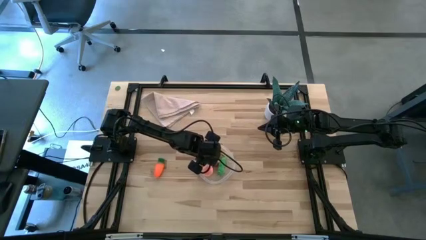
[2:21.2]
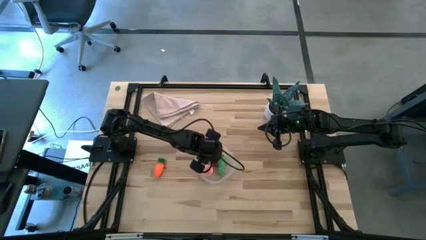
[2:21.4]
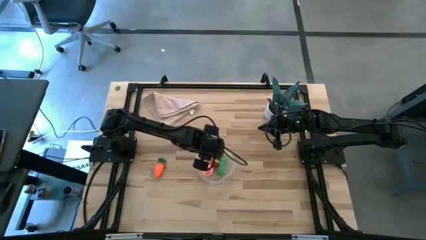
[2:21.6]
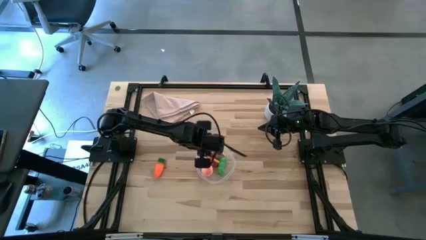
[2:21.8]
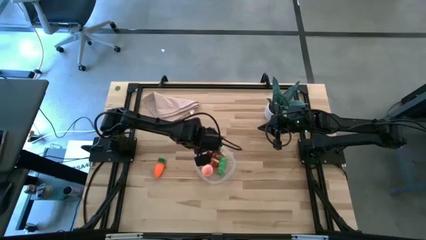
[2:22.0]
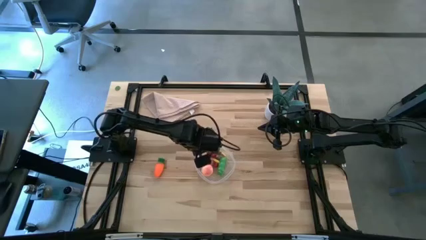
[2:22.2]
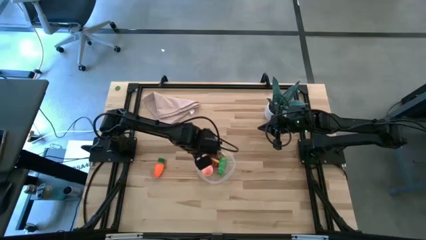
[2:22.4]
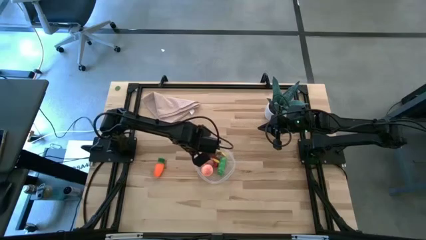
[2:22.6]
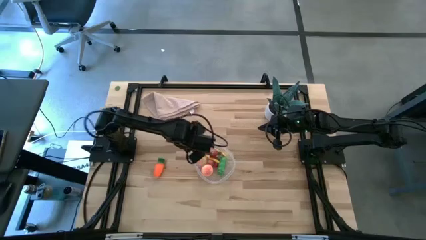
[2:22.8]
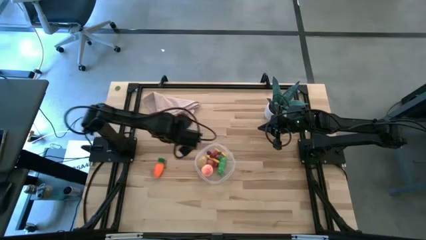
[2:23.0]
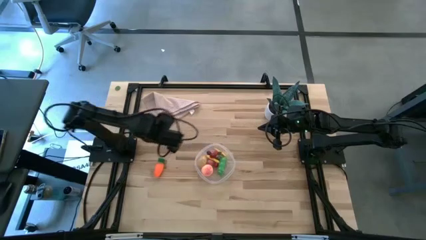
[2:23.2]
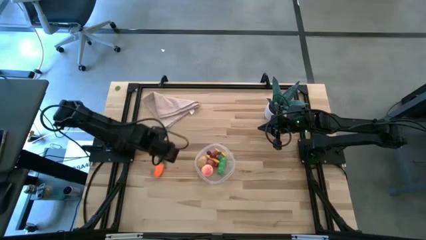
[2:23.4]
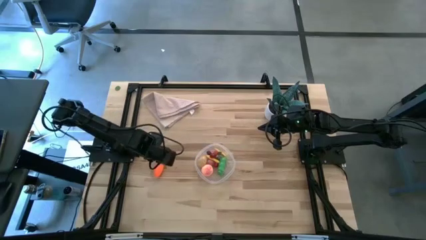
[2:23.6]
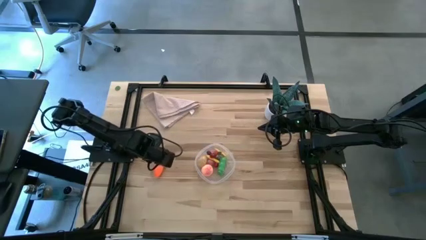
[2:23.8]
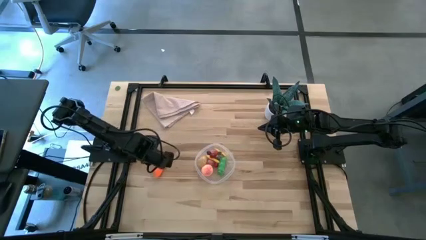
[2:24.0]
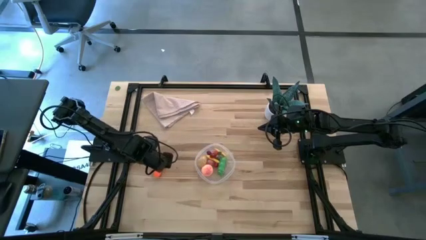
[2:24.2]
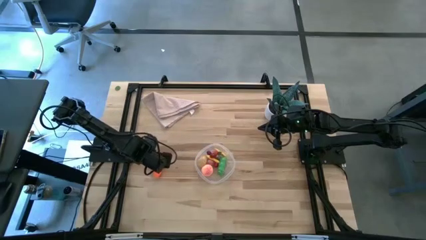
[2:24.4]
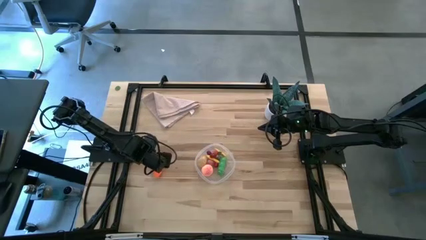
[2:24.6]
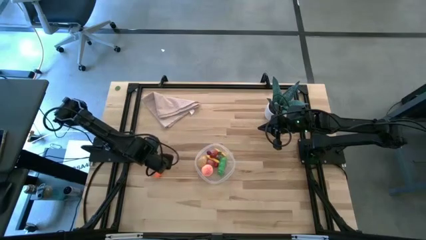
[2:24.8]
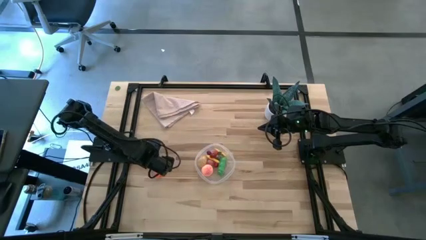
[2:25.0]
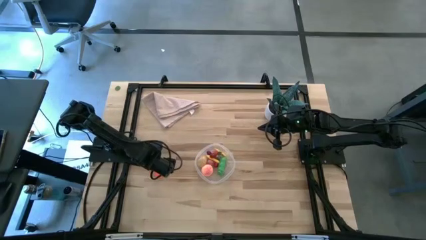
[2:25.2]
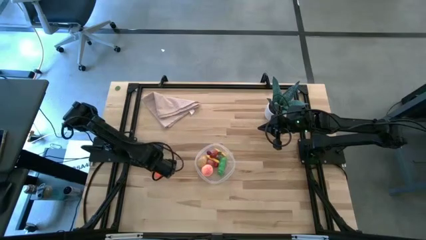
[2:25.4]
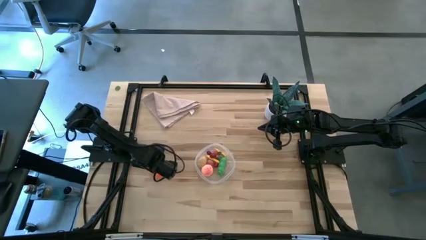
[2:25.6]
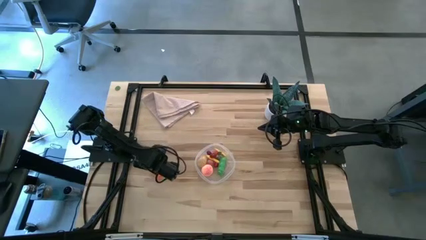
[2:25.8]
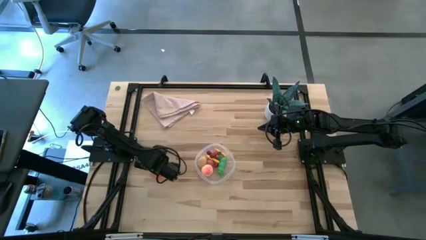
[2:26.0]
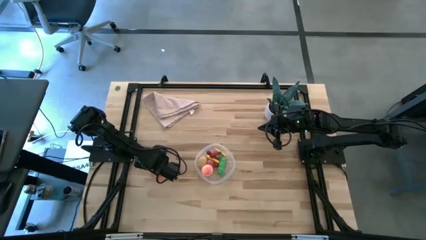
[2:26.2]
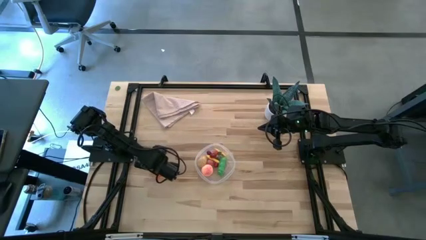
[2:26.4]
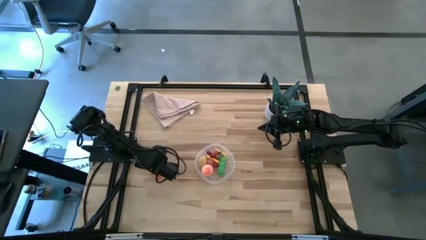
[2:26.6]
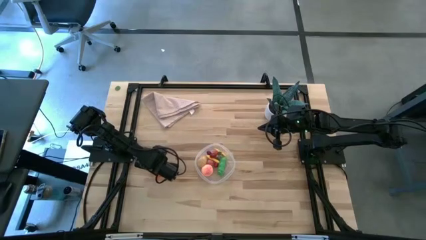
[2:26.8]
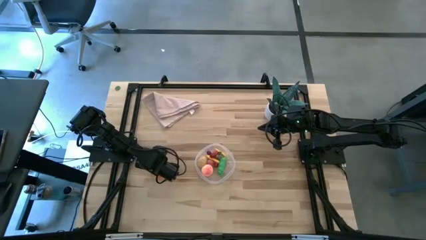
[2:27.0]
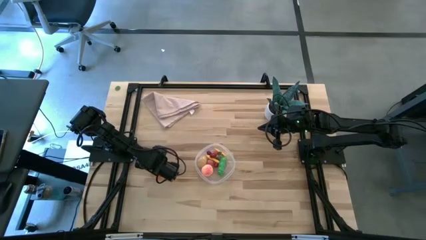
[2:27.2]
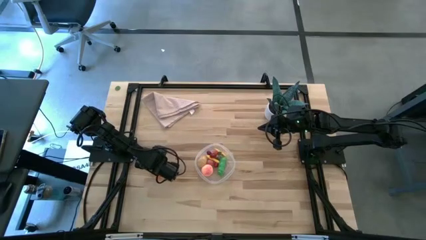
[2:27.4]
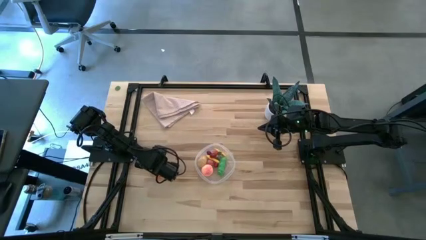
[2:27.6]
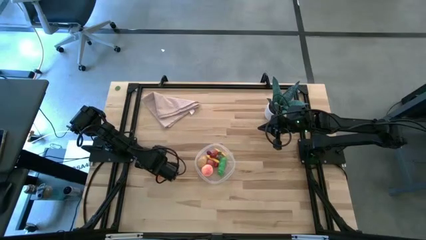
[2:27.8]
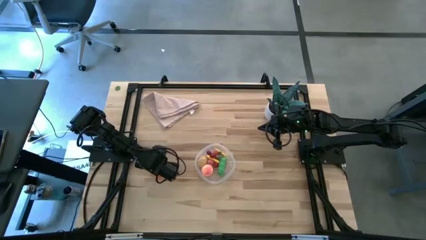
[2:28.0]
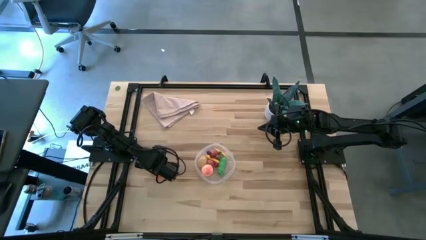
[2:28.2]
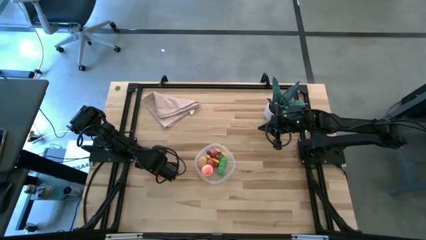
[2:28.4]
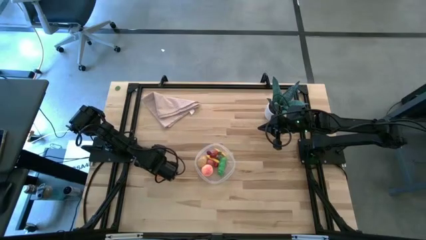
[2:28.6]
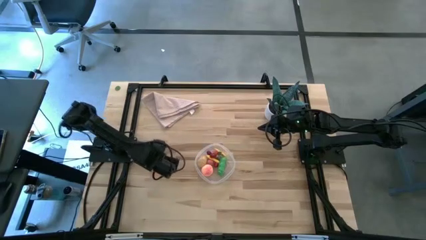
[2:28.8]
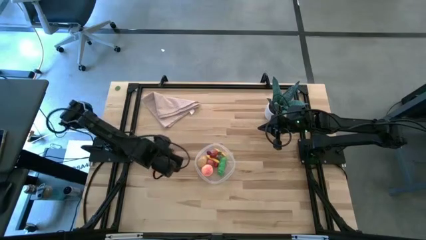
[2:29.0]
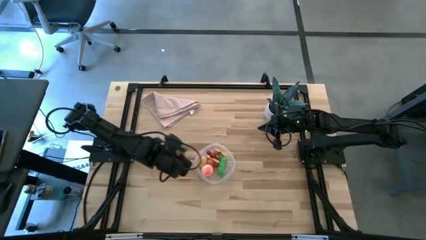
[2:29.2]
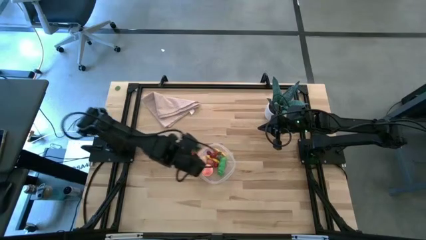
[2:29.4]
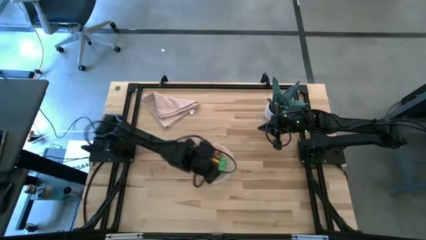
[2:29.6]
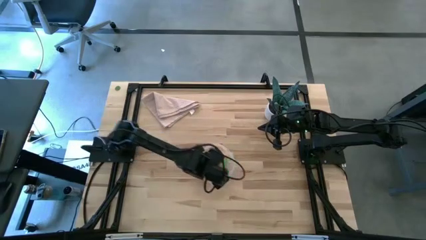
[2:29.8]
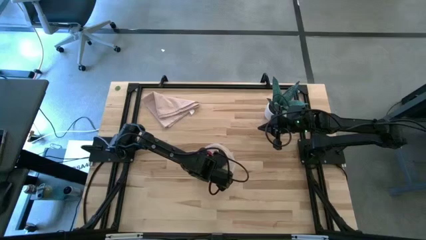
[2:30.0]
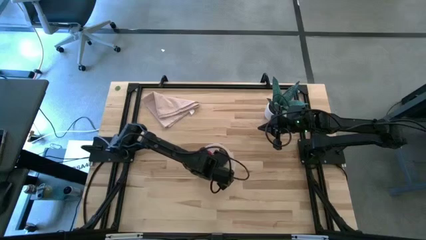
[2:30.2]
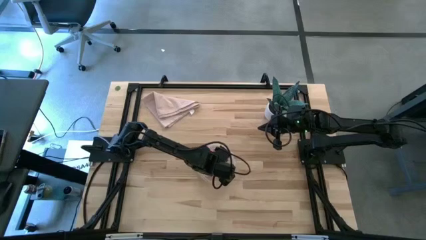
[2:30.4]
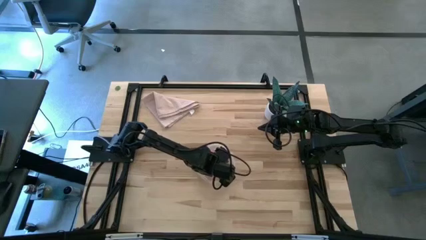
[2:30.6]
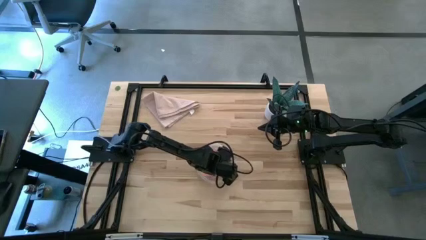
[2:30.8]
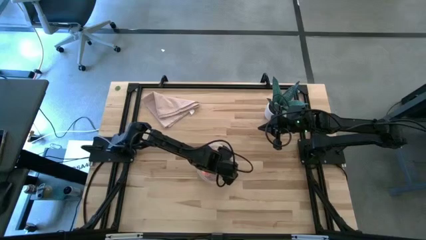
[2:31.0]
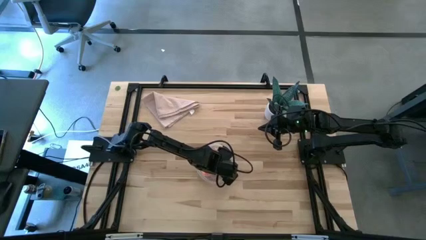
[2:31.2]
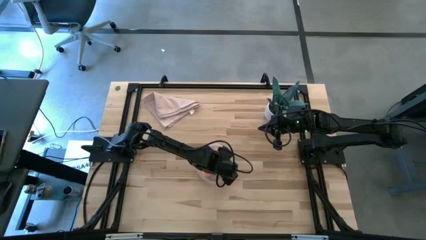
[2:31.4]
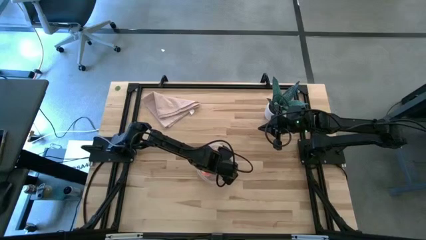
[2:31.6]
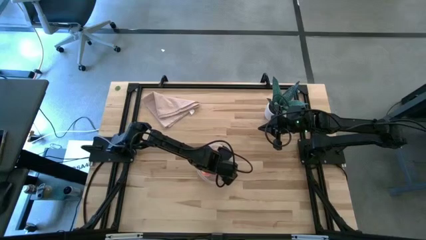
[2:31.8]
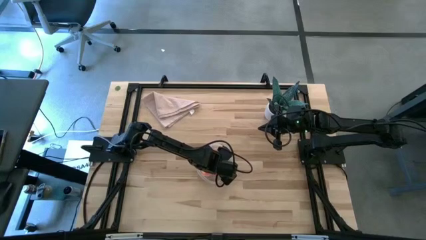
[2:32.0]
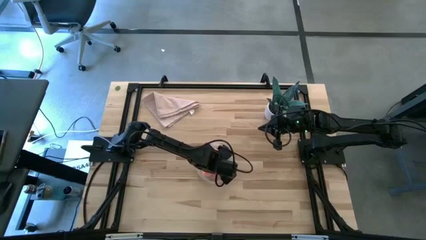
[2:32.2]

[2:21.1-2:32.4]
Task: Pick and placing Produce into tupperware
Put the carrot into the transparent bin

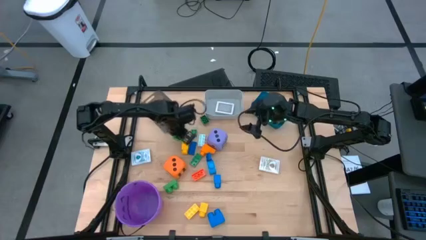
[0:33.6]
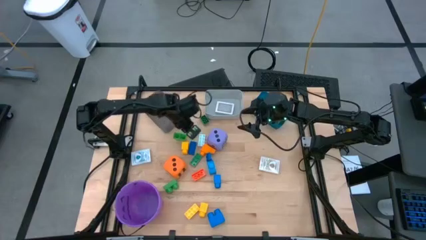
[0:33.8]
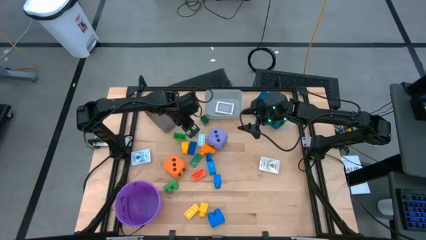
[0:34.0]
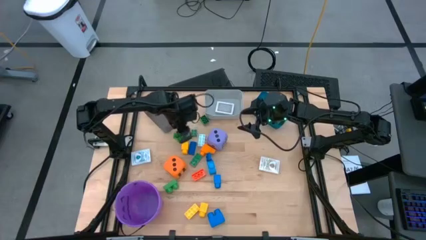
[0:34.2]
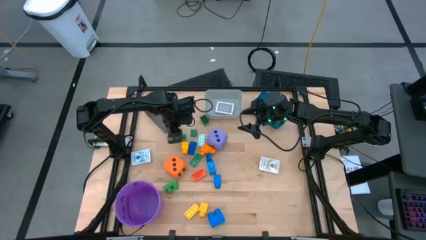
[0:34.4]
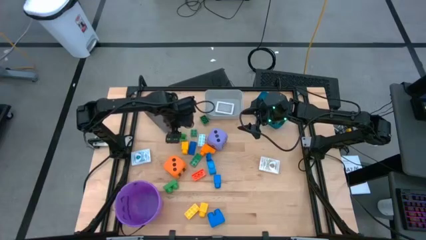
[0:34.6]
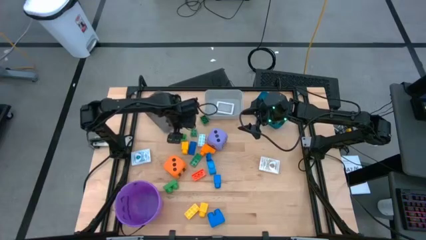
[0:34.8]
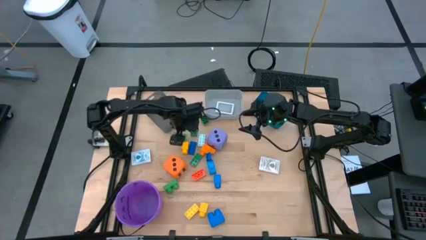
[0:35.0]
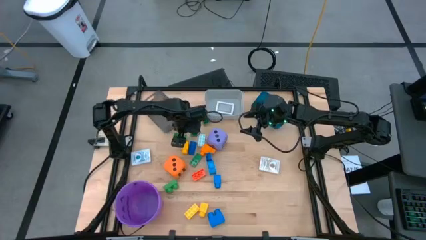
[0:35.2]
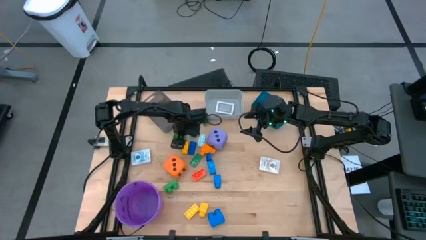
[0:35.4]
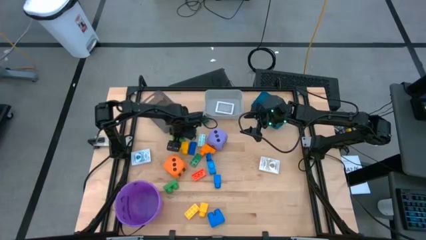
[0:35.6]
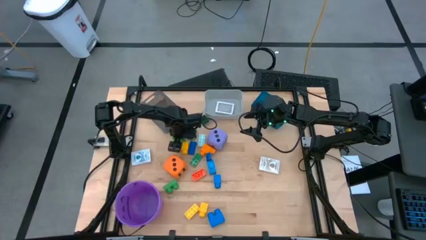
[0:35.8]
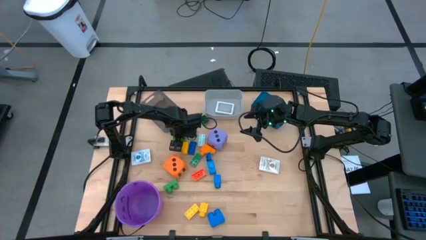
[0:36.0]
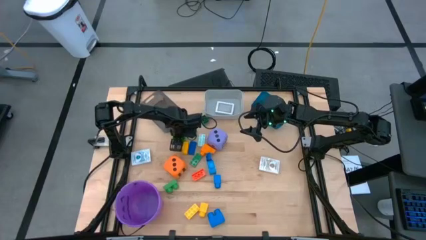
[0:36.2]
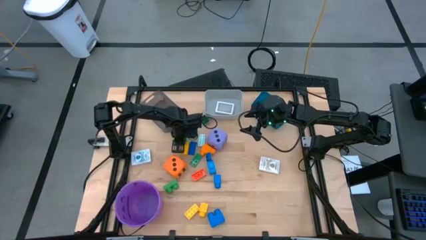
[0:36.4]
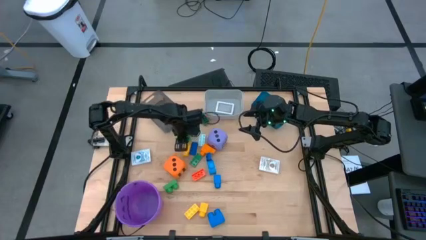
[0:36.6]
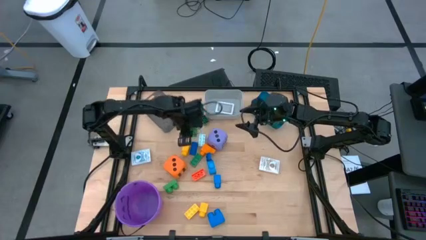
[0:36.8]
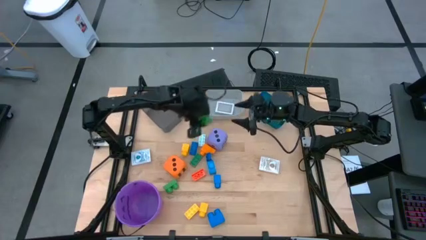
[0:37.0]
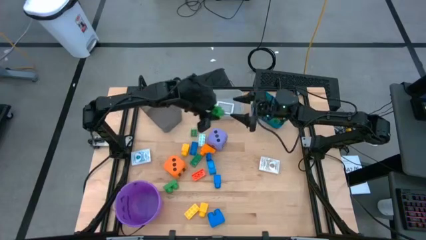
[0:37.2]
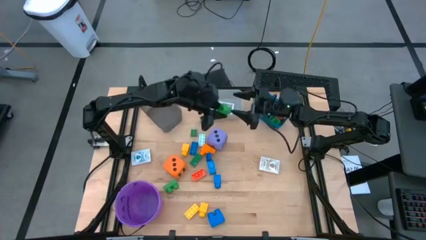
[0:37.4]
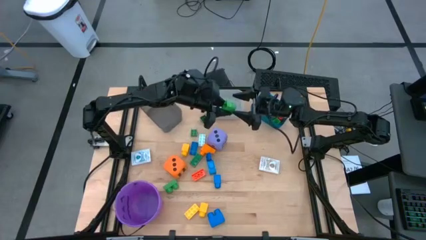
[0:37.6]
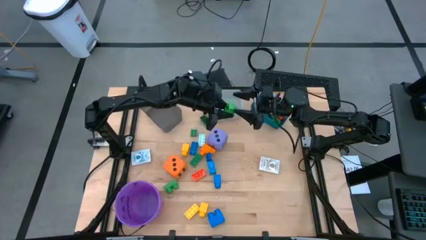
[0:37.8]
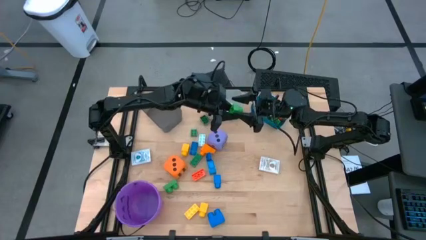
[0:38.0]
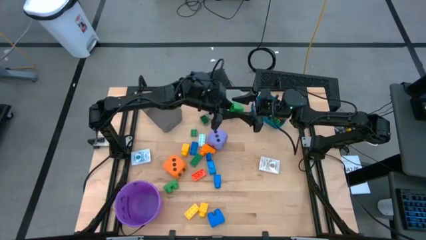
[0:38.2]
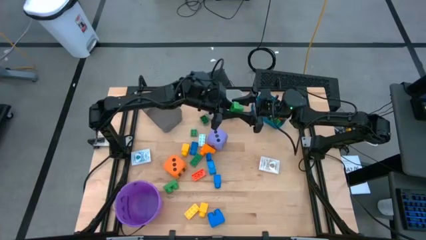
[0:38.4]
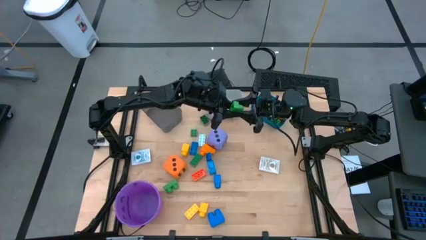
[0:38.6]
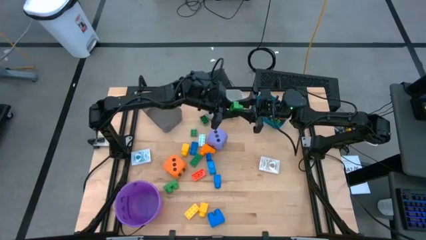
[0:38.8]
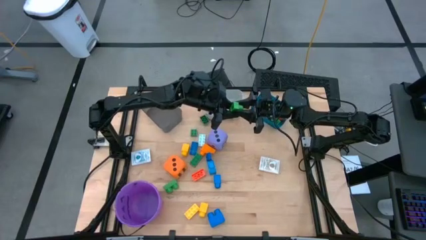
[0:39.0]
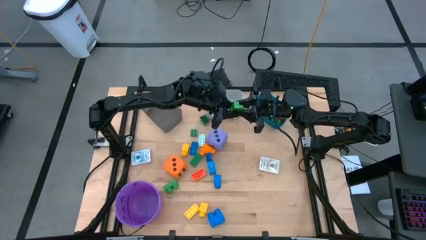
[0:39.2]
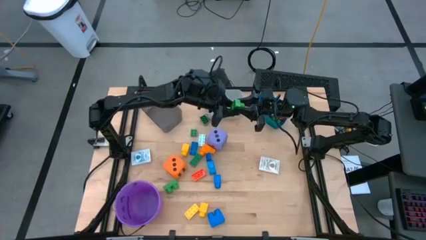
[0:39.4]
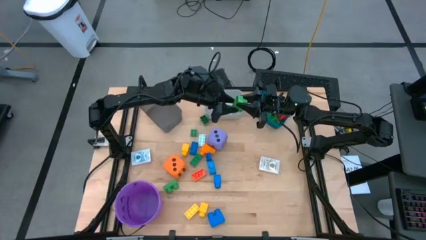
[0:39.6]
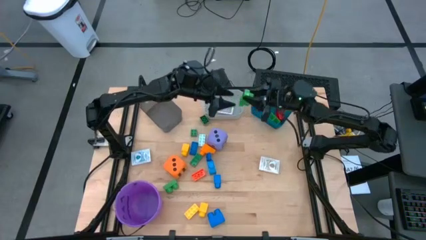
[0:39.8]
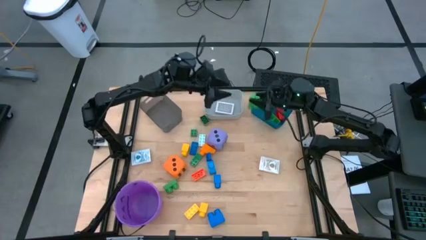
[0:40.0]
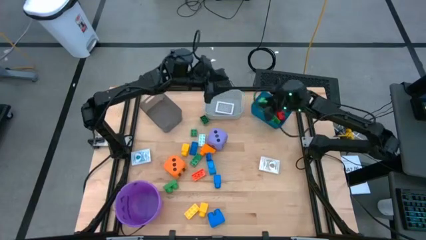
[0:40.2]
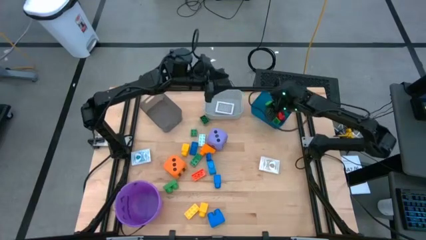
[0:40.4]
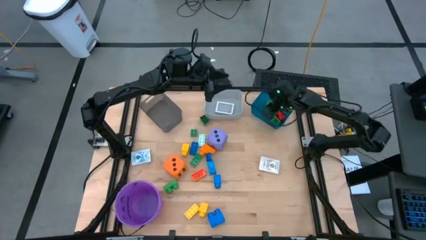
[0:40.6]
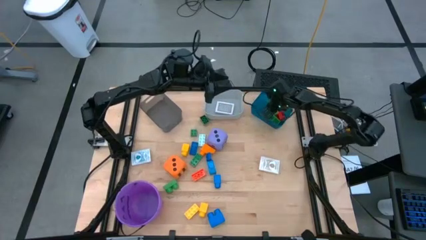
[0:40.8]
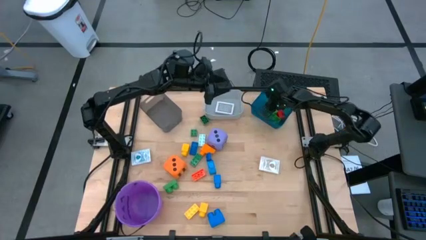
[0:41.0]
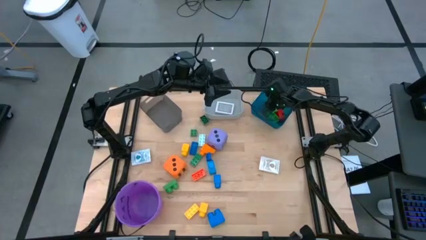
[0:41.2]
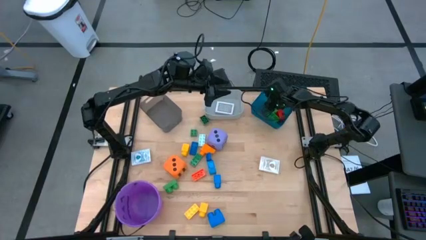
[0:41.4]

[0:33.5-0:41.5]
Task: Pick & Place Toys
Put the green game piece into the blue bin
